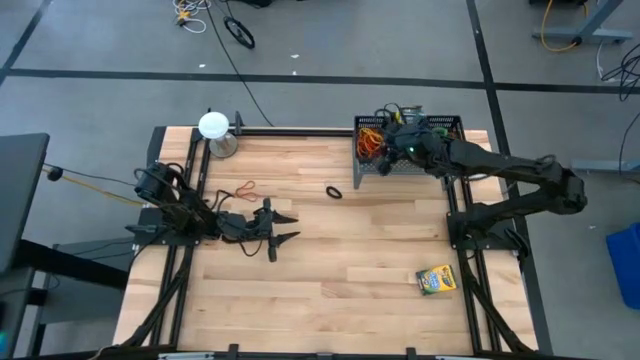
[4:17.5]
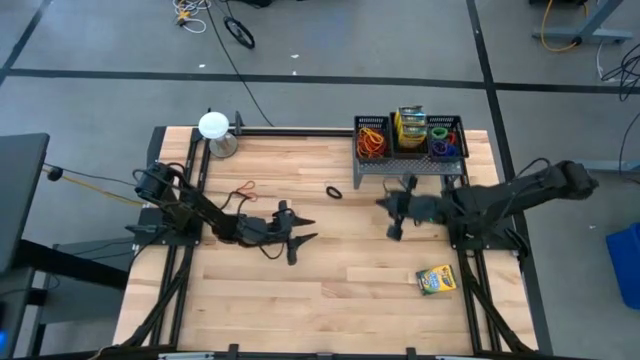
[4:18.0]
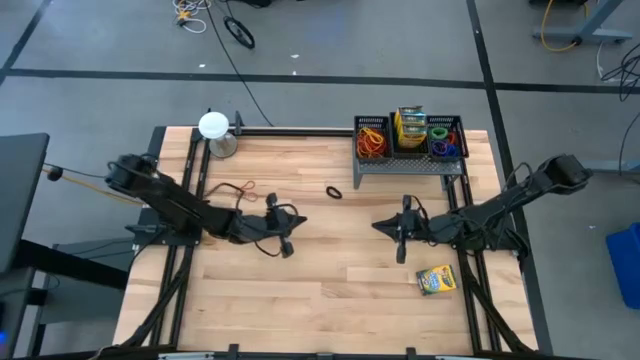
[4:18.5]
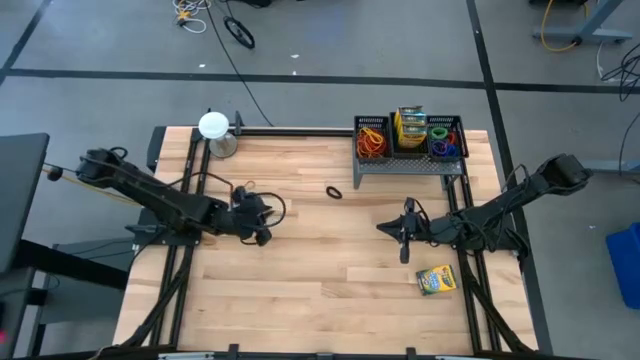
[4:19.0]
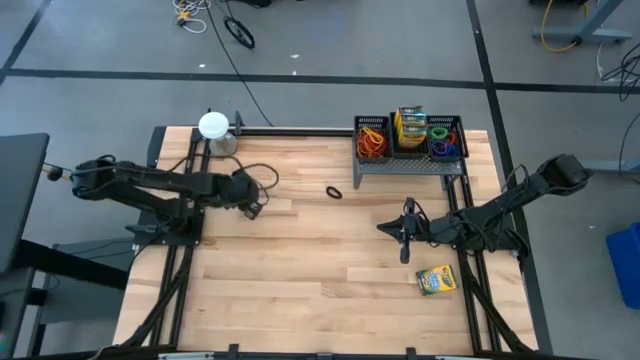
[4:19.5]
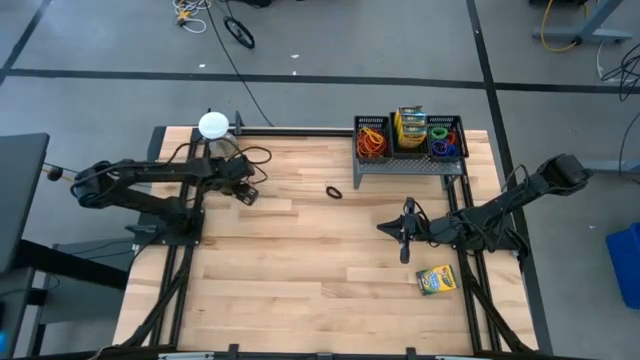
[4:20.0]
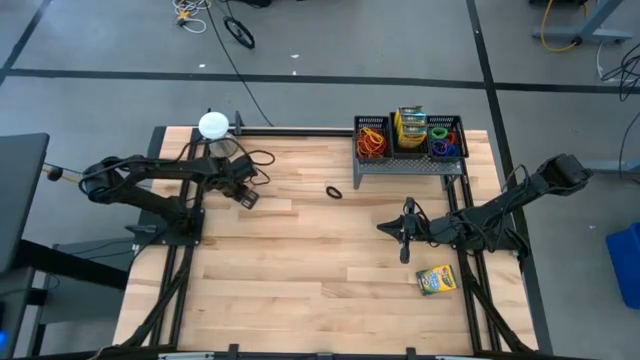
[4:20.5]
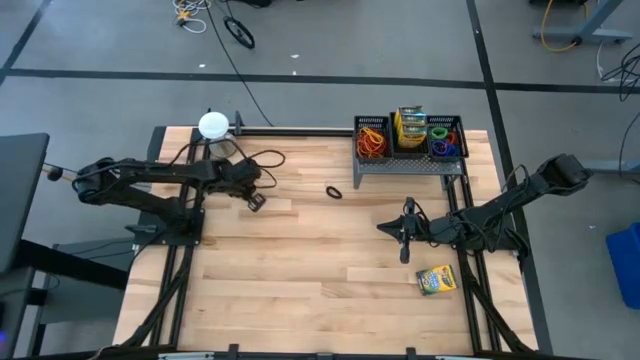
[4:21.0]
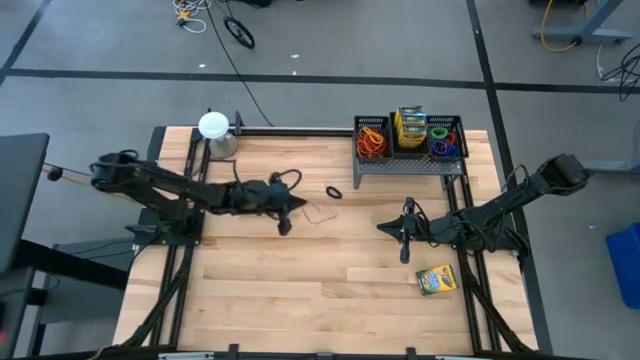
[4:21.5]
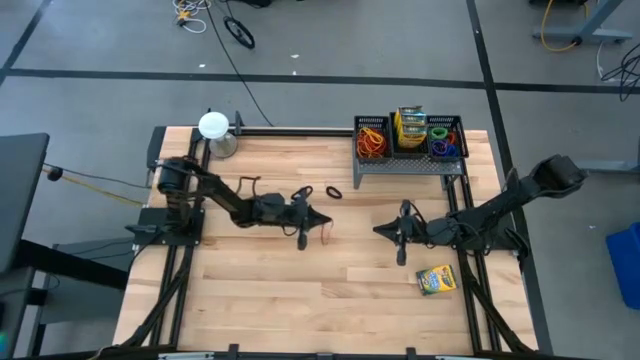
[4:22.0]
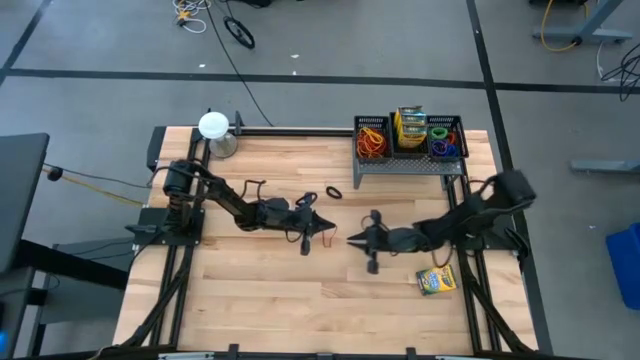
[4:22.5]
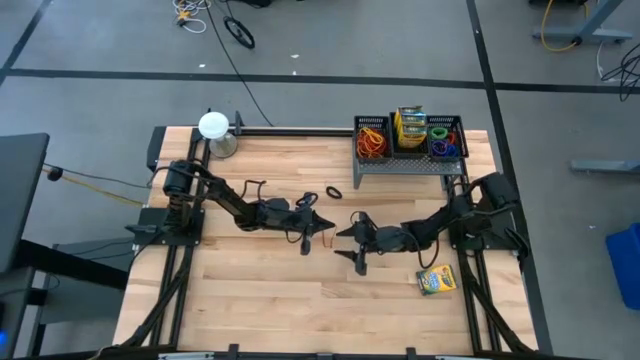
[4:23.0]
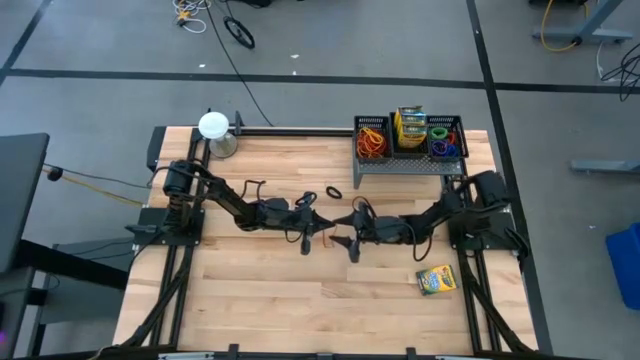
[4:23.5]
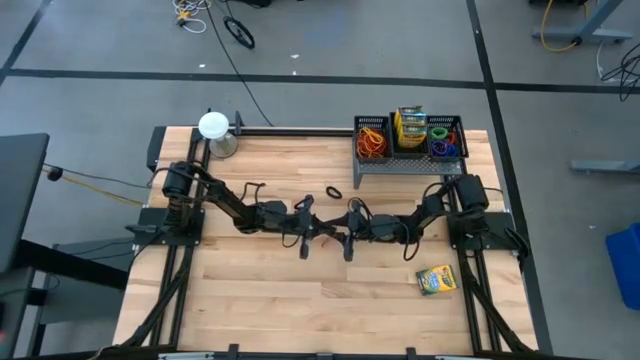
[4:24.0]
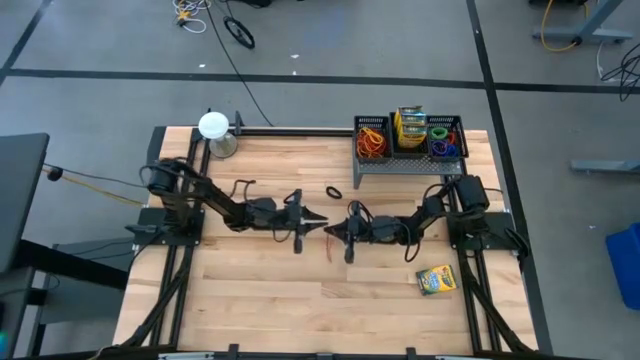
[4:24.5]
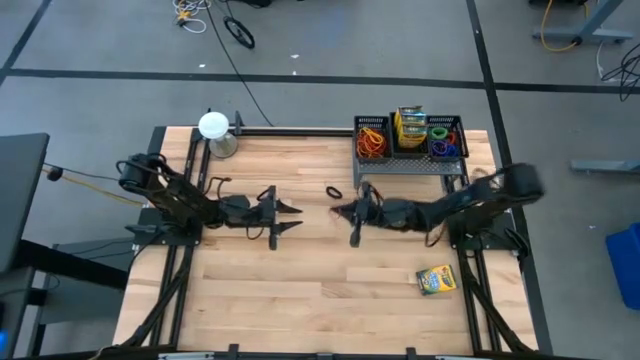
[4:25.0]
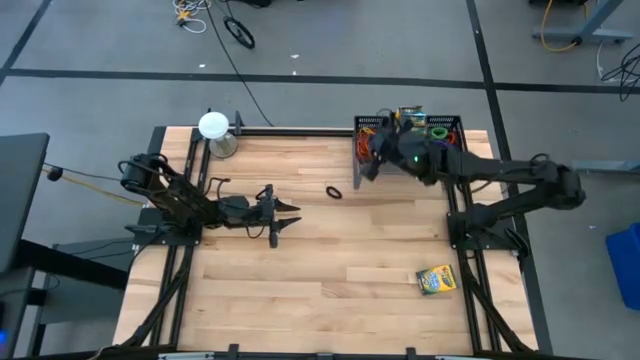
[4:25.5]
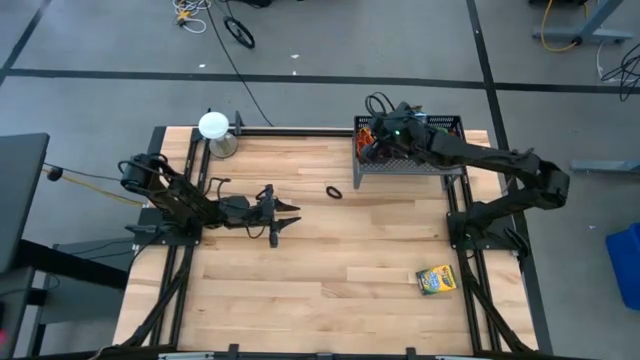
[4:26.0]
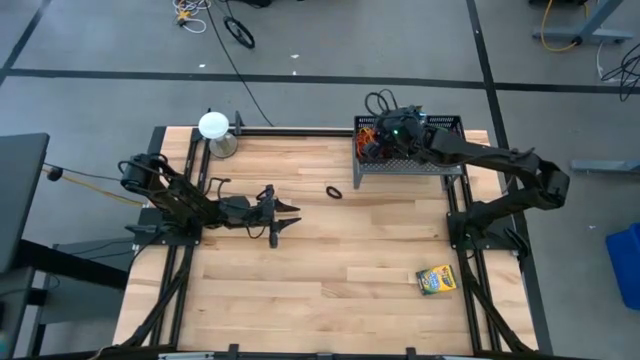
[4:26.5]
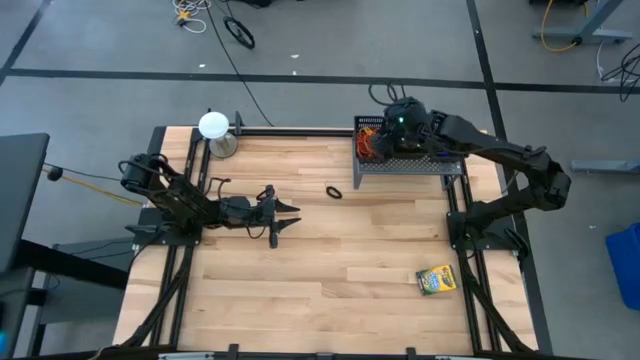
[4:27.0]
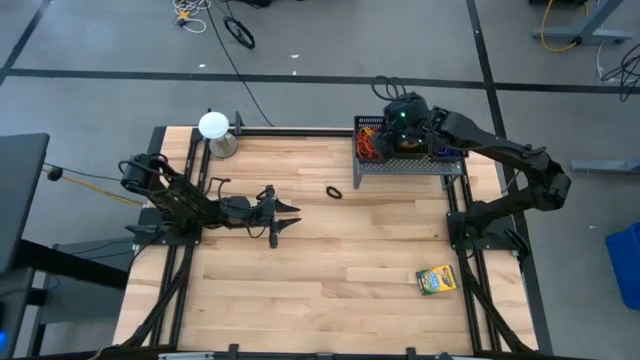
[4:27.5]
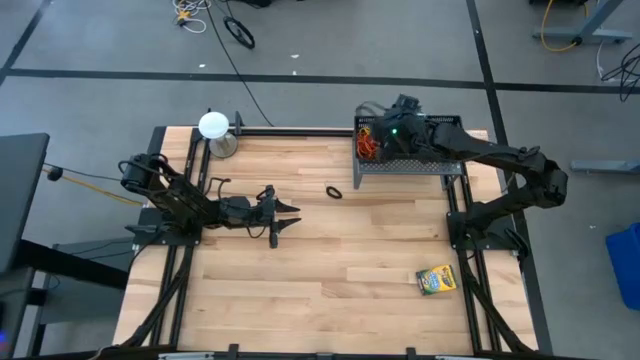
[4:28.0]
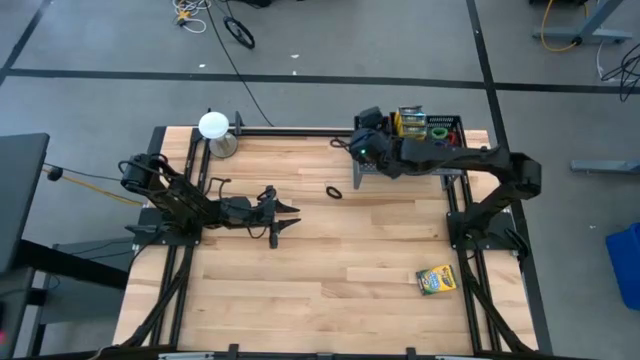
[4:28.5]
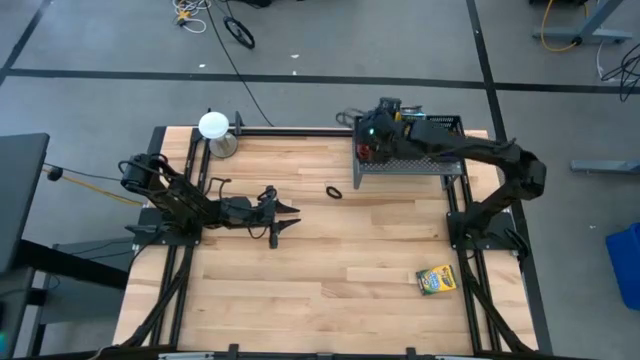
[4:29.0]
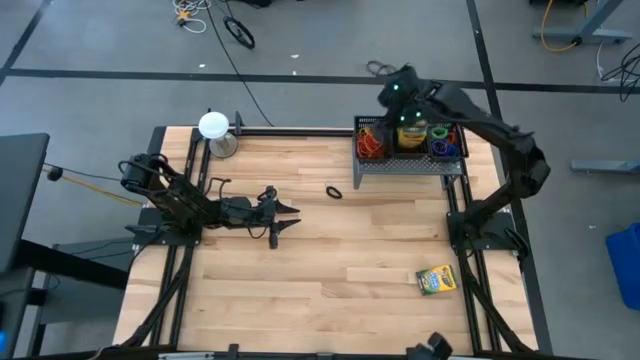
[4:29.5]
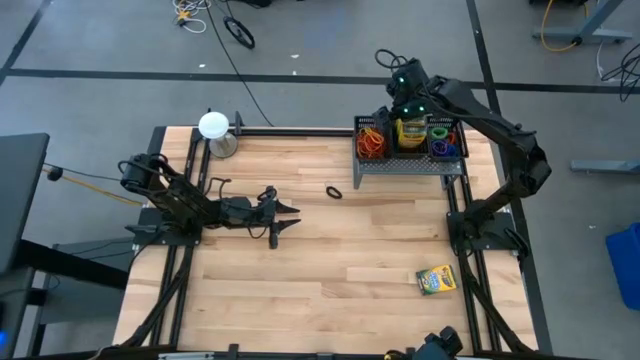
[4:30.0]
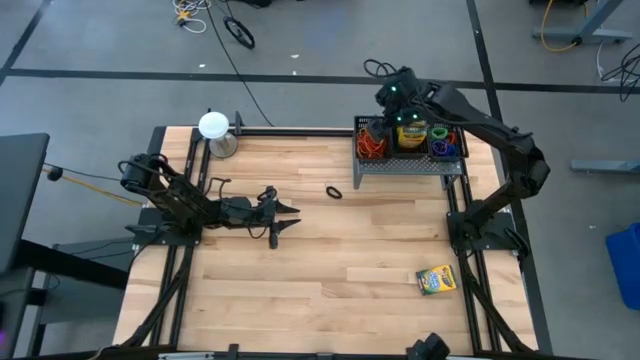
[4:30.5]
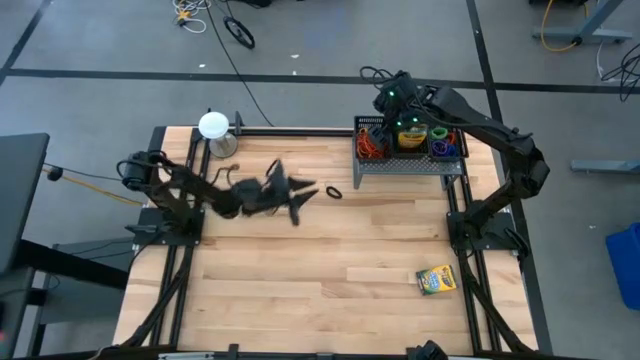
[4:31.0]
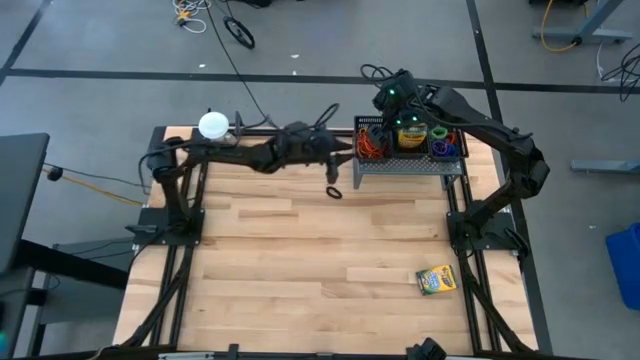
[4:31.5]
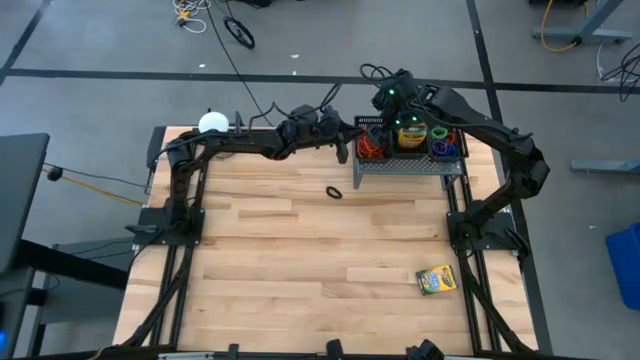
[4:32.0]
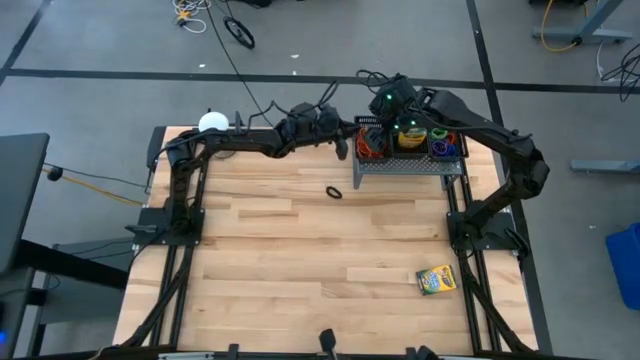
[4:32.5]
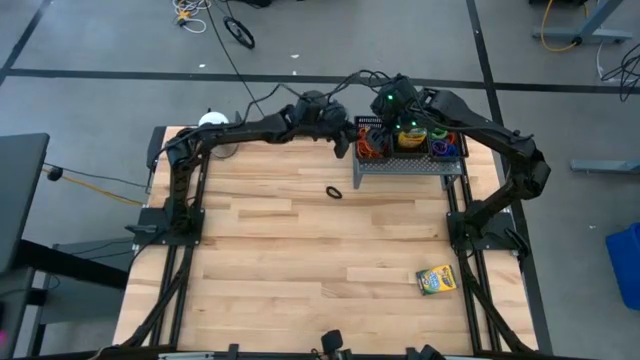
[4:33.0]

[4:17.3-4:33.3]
Task: Pick & Place Office Desk Supplies
Put the red rubber band into the left black bin on the shelf

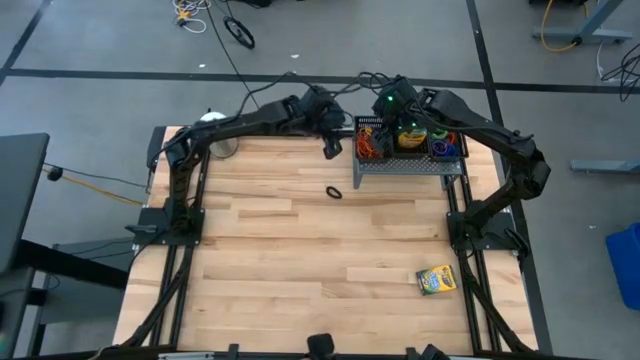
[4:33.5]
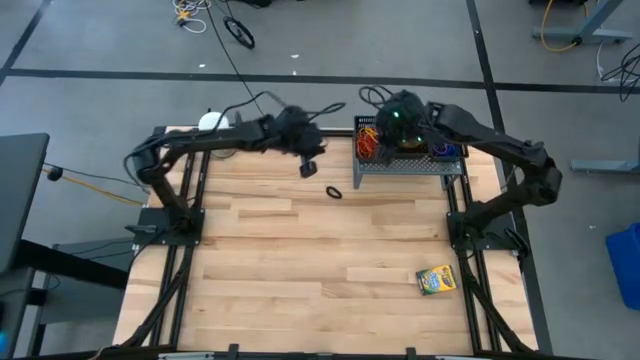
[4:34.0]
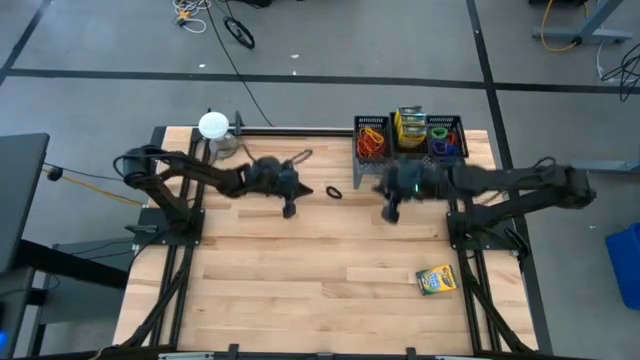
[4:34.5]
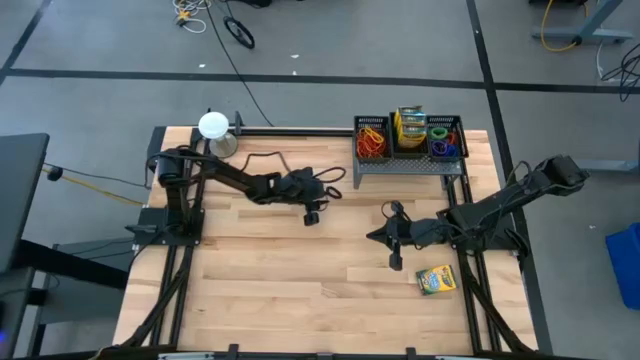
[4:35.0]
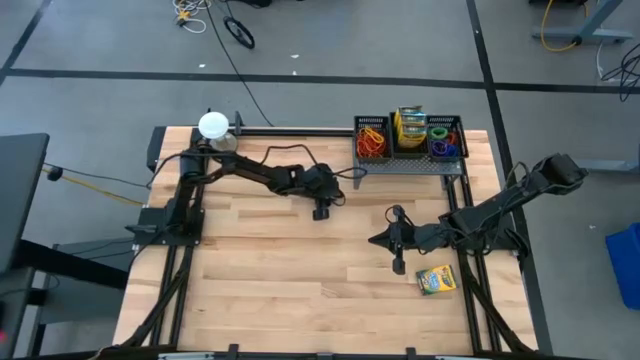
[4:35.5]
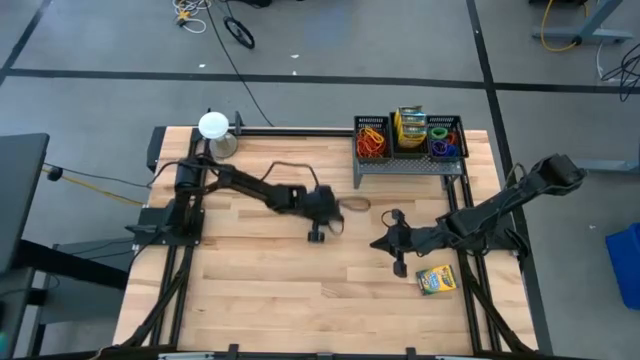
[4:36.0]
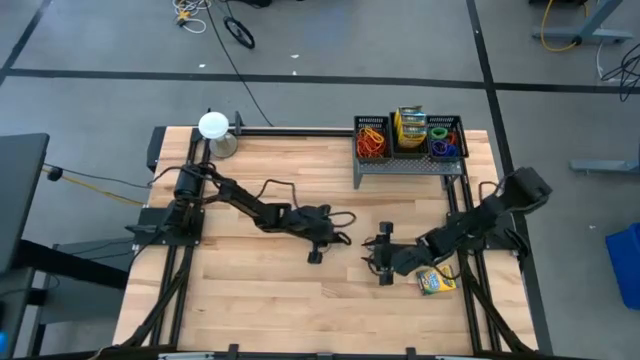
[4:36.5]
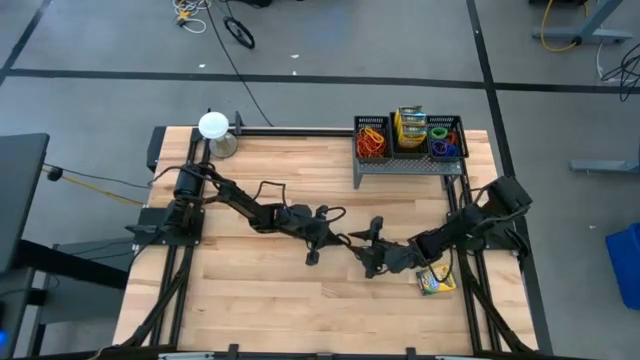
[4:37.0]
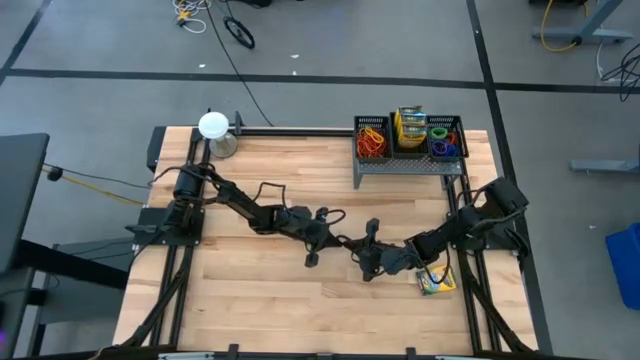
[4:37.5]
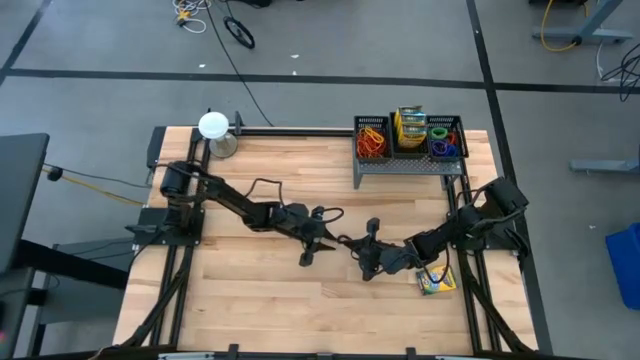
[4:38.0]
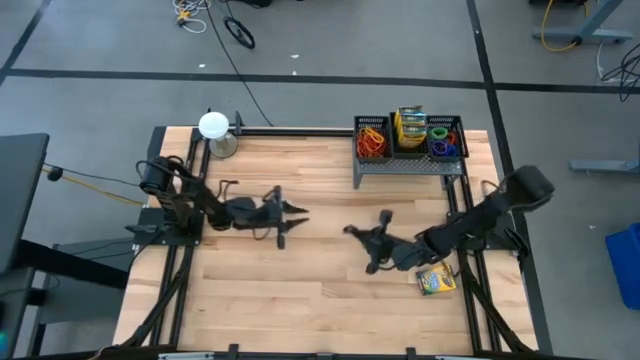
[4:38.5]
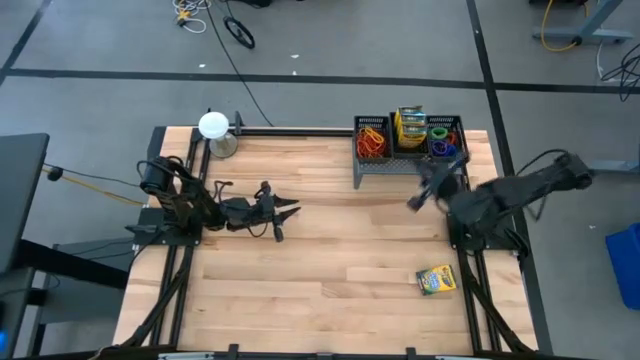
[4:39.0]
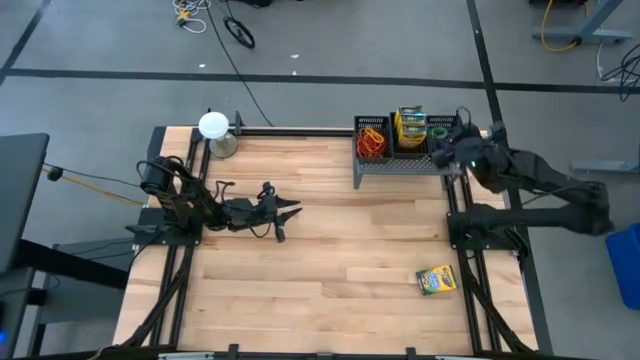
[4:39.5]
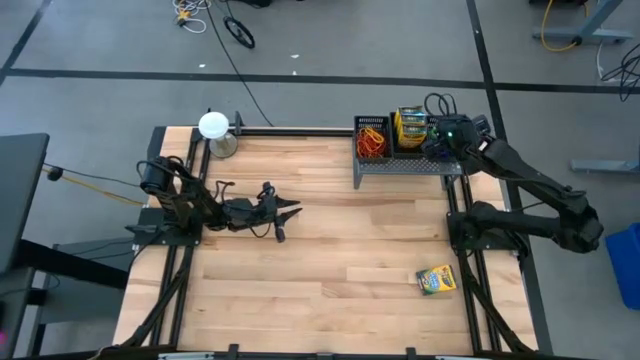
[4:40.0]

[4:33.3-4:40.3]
Put the black spring keychain into the right black bin on the shelf
